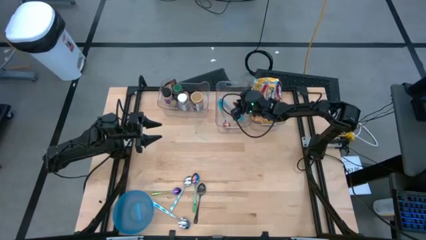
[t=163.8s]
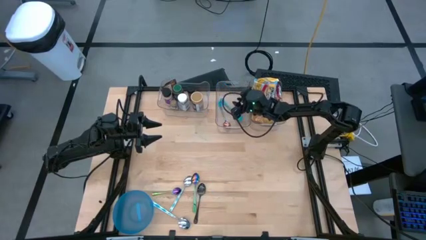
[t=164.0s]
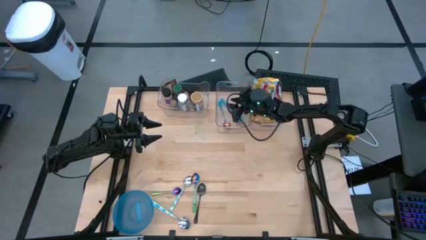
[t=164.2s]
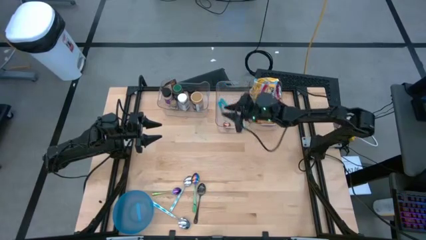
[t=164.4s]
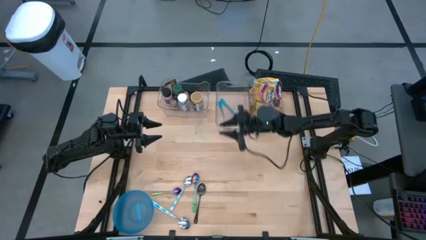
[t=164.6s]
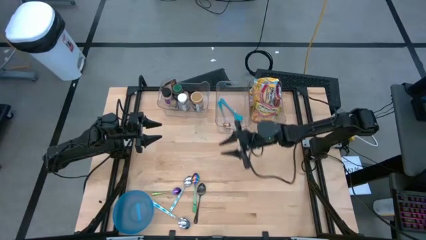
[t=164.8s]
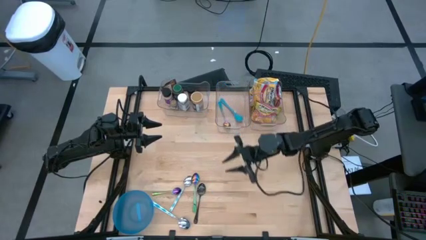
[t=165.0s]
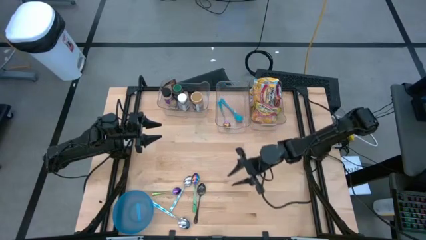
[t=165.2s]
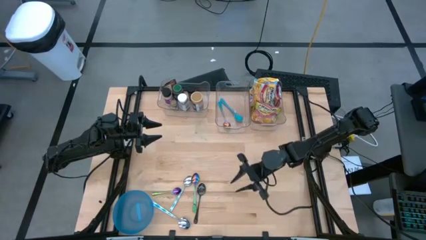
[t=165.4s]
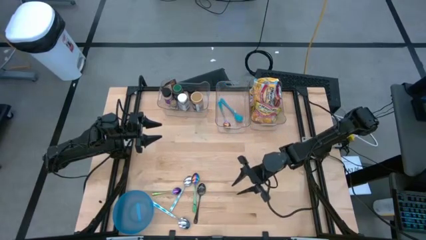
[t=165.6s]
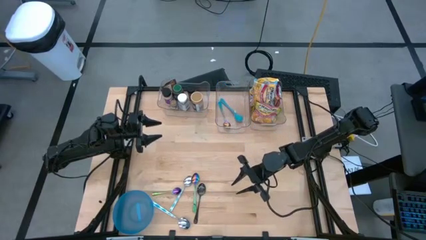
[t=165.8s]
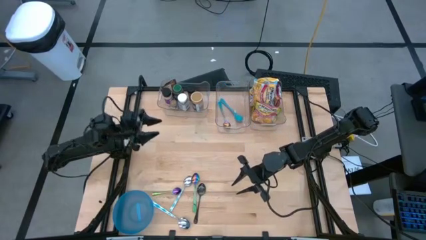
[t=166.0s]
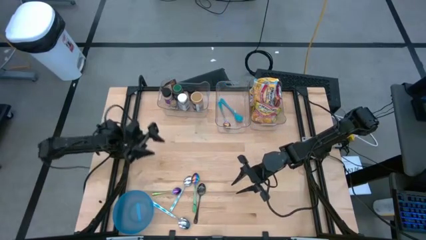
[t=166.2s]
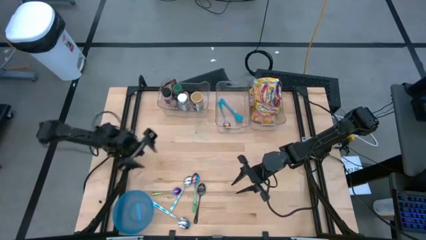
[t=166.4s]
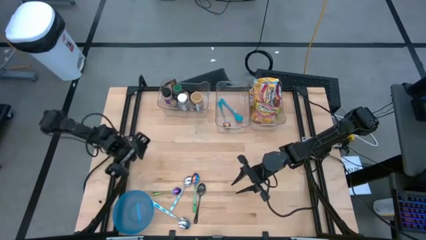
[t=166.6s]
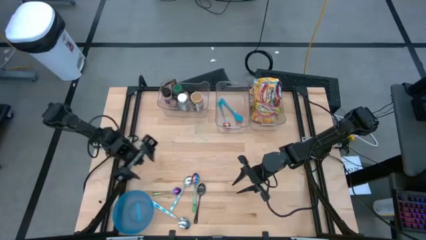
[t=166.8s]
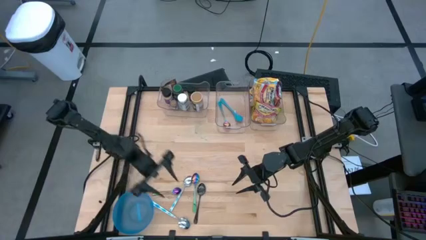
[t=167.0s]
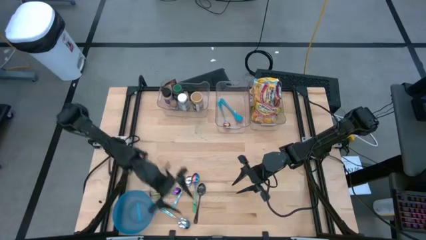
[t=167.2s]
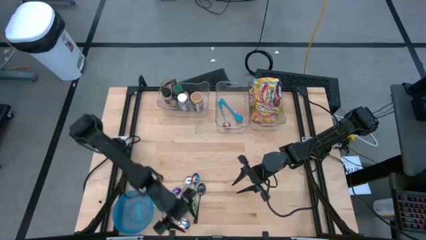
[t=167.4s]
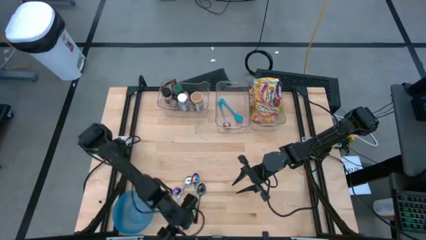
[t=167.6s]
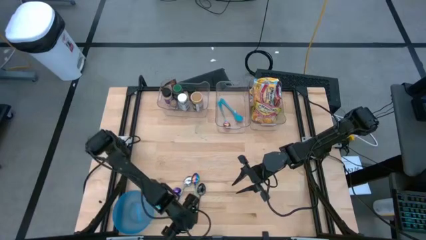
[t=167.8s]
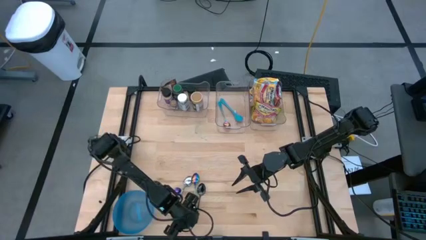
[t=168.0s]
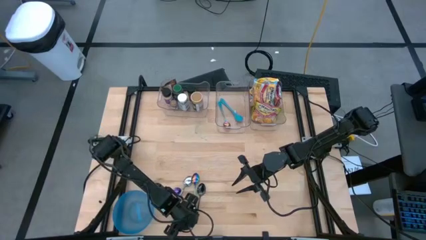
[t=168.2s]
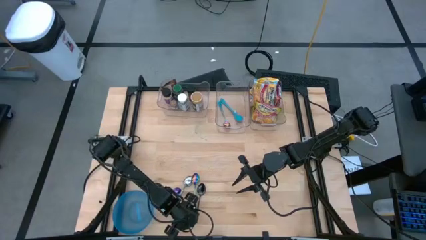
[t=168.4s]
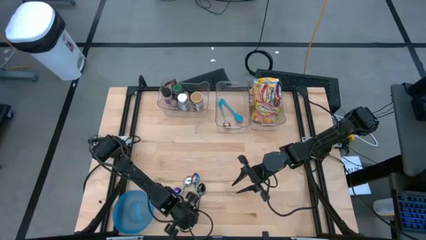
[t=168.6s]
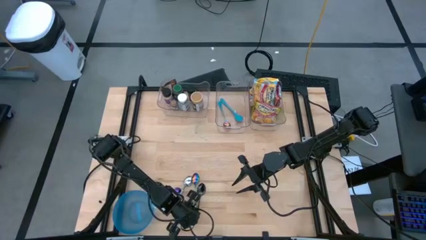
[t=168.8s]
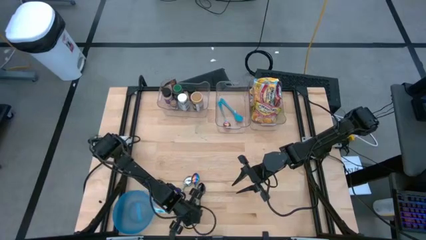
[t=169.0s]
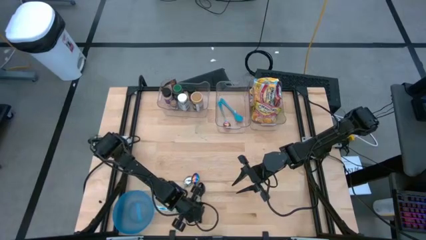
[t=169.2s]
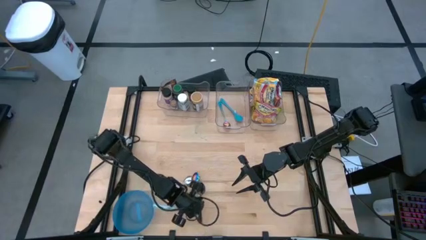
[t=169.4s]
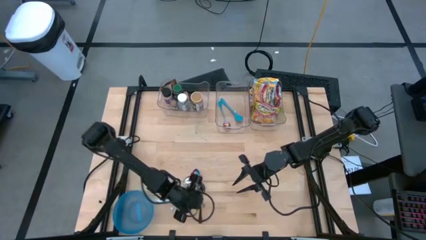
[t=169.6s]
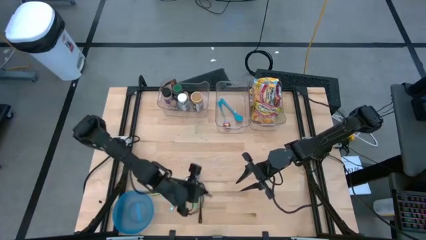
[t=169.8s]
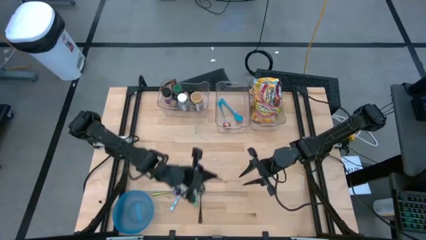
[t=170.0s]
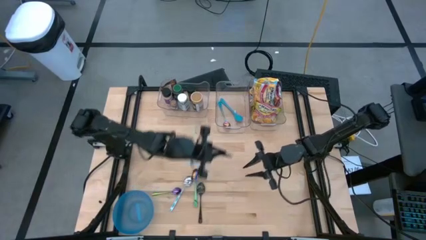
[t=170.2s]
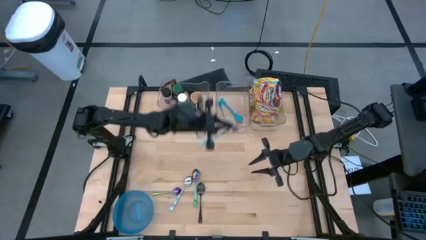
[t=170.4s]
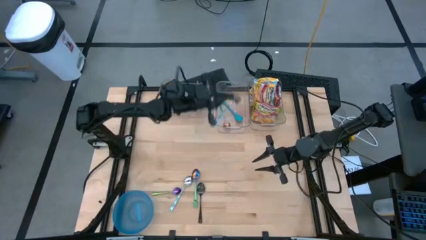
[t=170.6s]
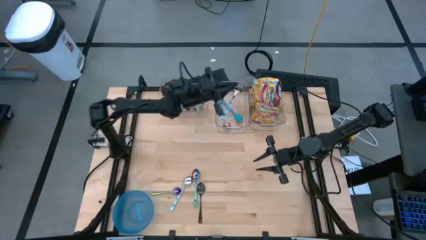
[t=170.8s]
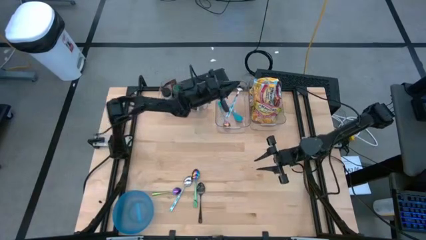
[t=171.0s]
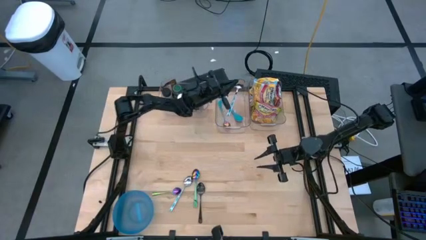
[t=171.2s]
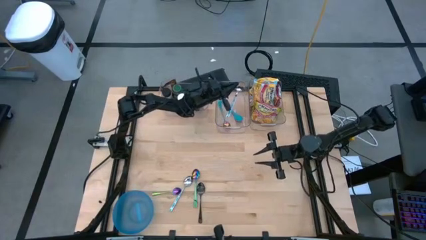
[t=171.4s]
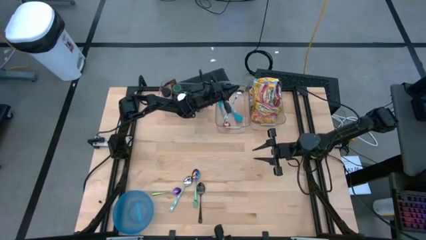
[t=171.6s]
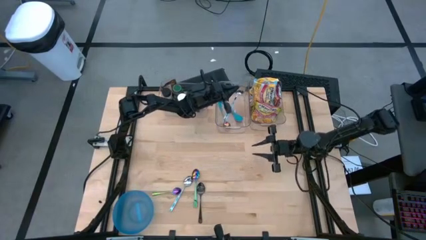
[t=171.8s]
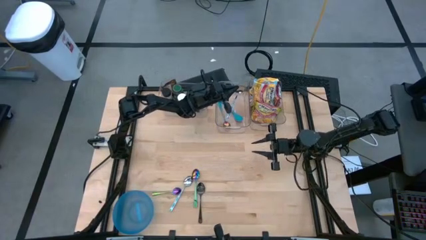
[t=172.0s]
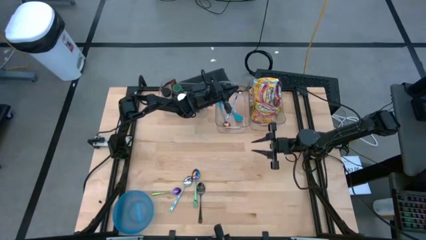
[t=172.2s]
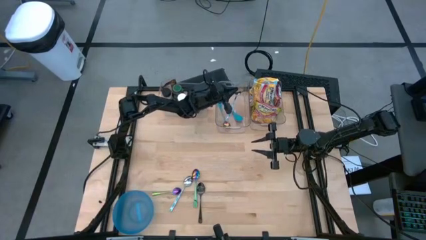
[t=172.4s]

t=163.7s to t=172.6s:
Task: Pick & Place Food Item
Put the silver spoon into the middle transparent bin

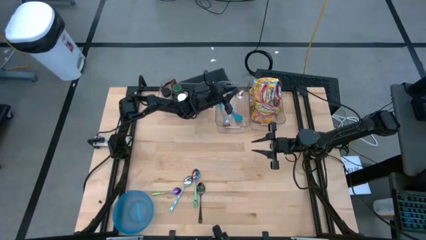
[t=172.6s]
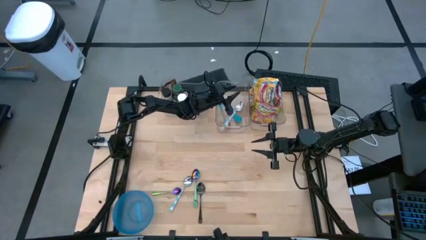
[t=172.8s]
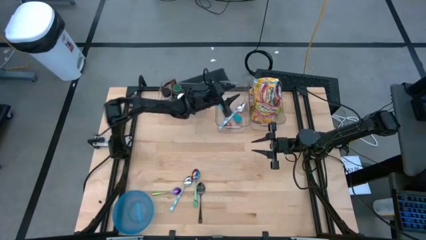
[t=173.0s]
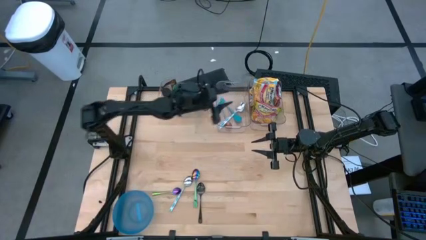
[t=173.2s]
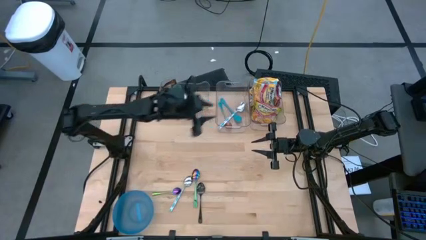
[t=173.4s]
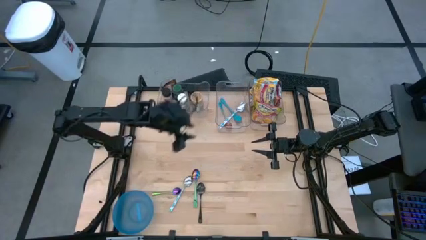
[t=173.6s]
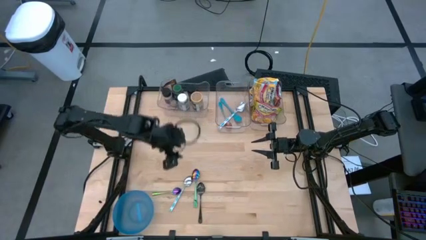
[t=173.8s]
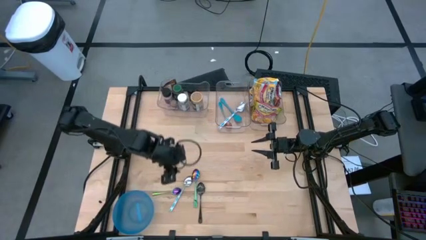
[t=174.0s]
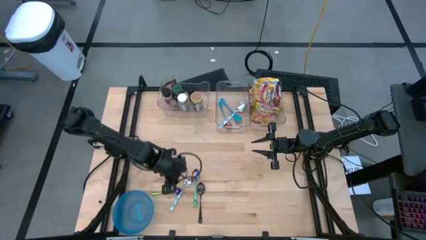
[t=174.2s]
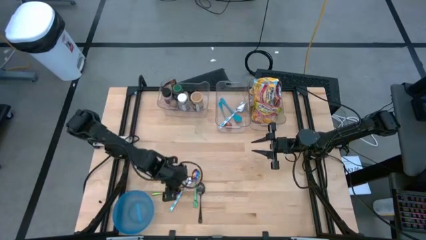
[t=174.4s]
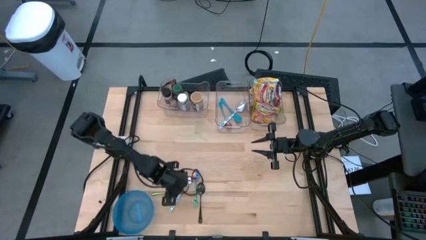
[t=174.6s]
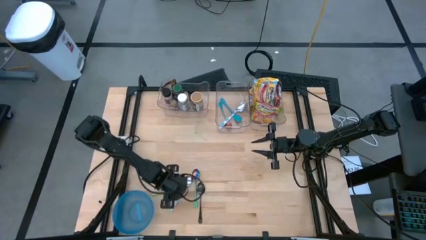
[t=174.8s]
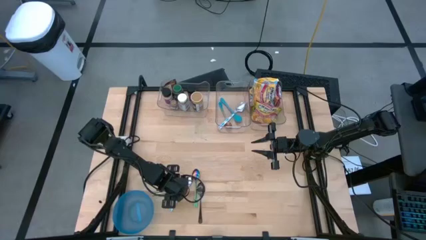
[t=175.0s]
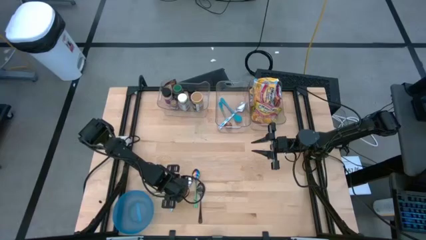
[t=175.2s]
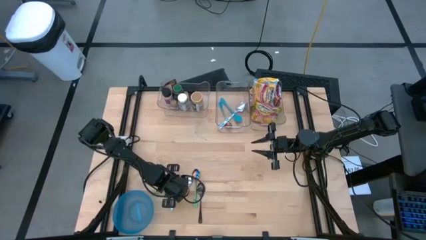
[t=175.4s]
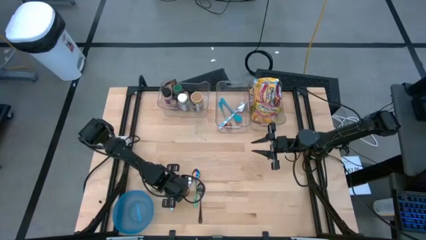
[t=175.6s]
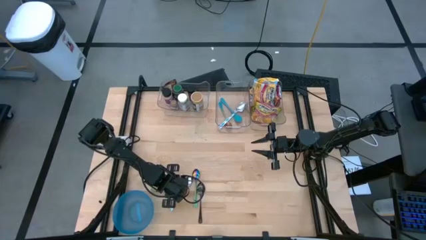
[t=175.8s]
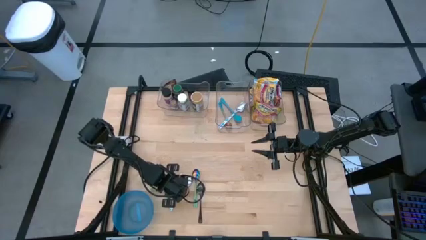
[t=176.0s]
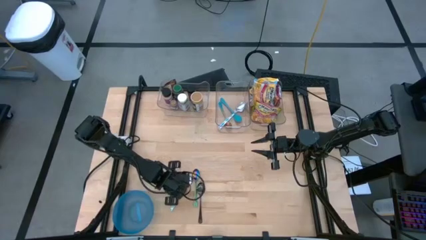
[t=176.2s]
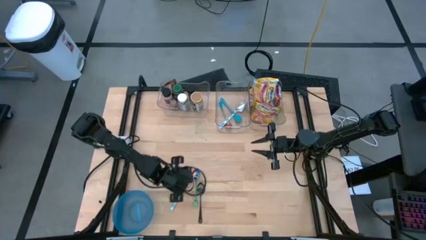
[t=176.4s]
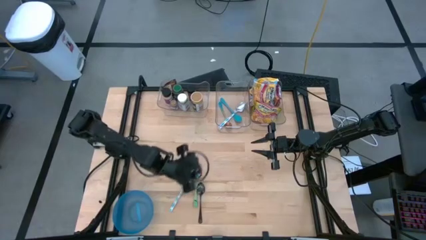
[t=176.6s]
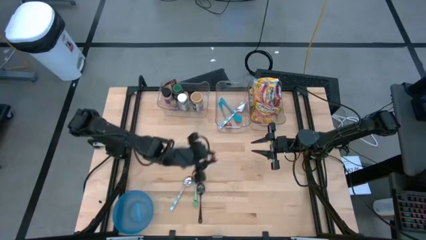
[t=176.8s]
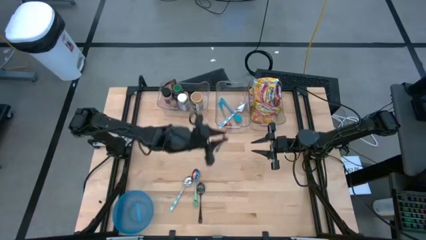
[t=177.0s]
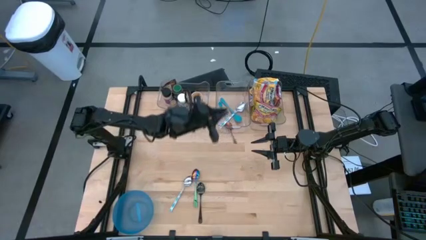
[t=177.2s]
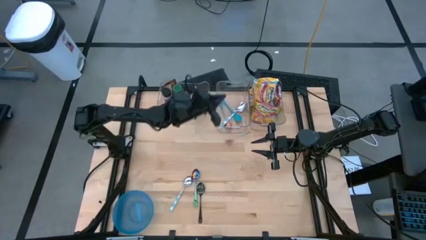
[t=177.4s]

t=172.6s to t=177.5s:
Put the purple spoon into the middle transparent bin

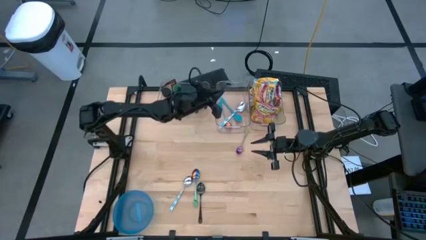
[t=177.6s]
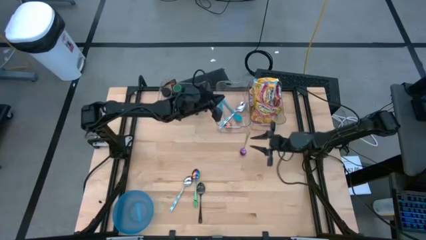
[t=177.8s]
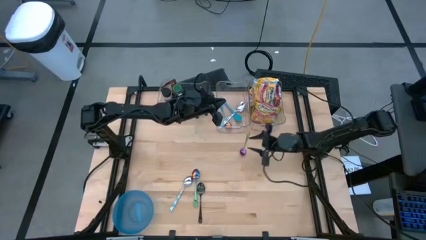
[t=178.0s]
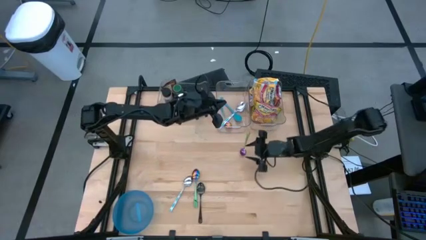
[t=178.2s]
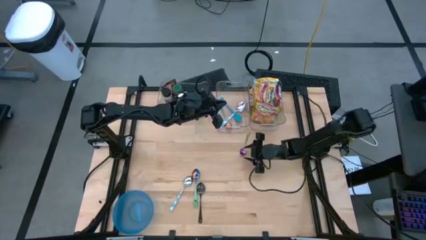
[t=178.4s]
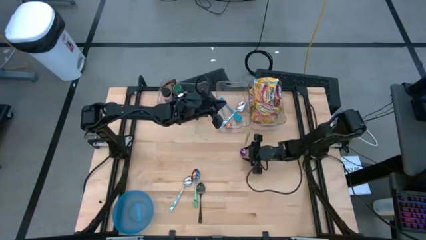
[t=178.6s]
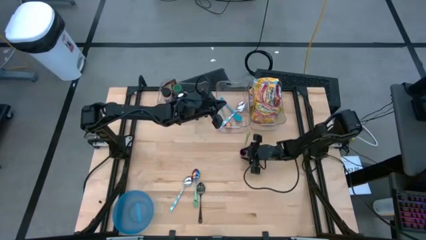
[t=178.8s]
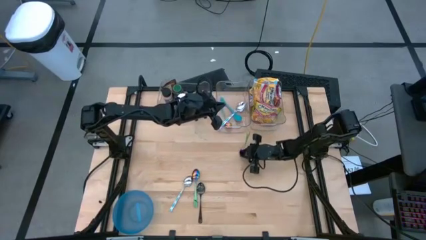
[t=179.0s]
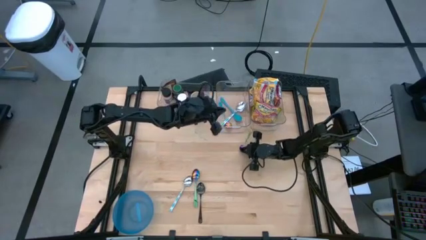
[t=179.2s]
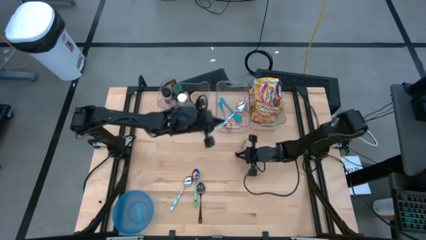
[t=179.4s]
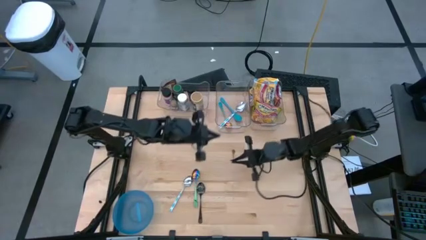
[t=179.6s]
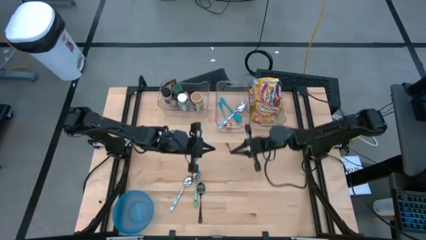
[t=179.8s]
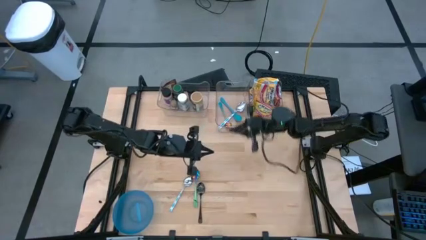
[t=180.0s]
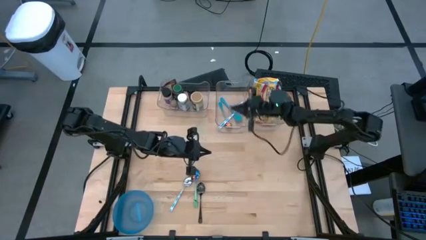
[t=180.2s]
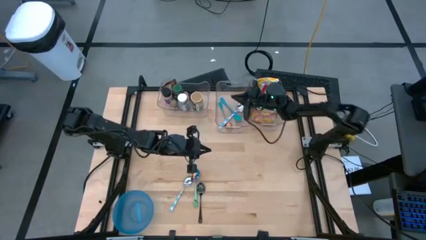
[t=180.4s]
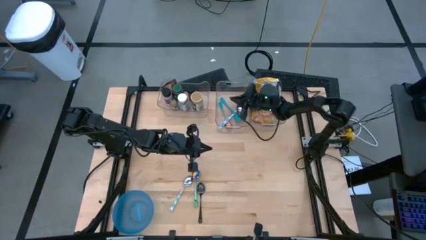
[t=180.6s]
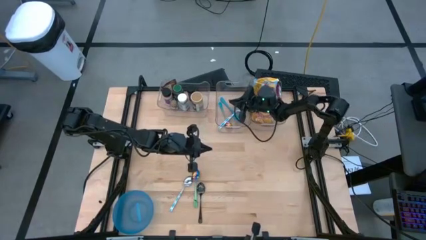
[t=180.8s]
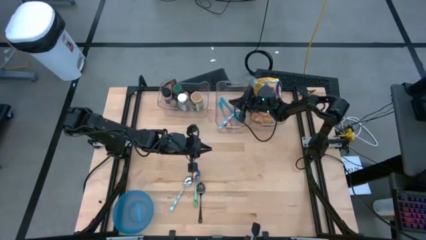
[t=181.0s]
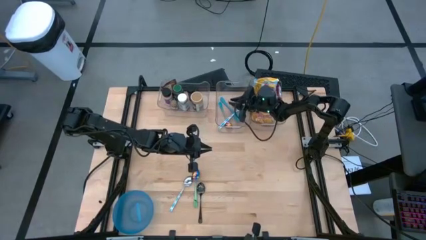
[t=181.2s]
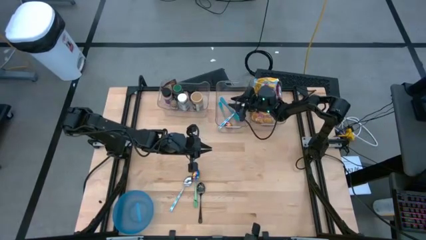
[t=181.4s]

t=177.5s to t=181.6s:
Put the purple spoon into the middle transparent bin
